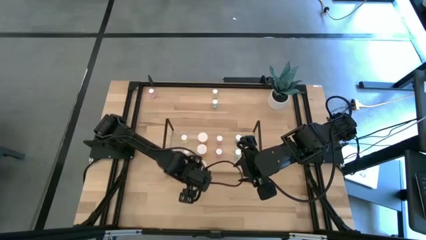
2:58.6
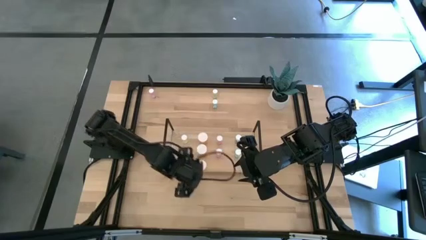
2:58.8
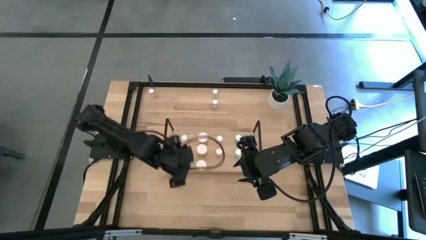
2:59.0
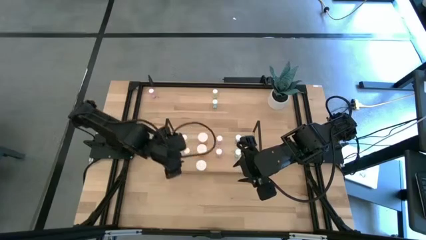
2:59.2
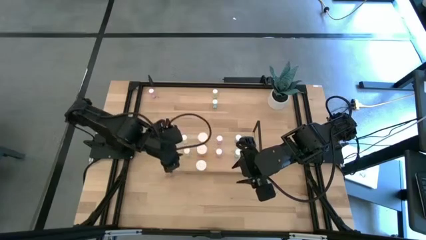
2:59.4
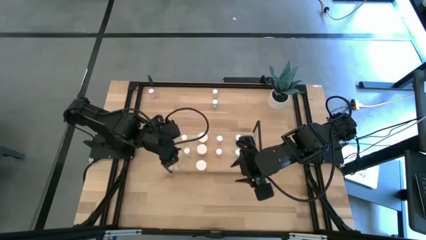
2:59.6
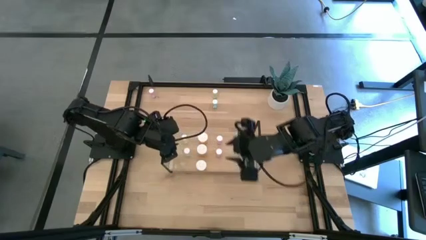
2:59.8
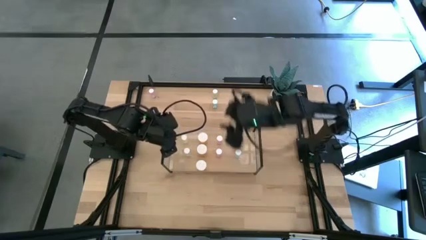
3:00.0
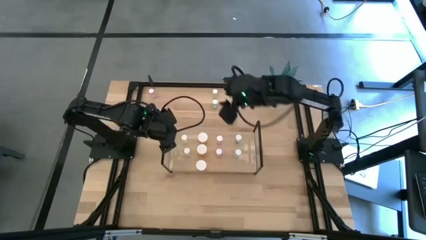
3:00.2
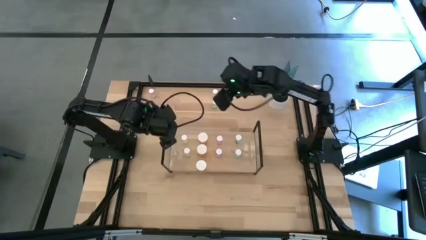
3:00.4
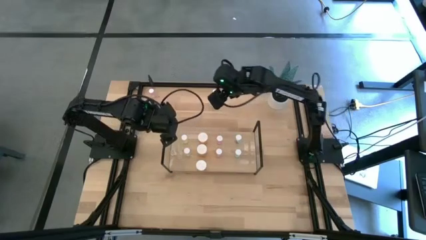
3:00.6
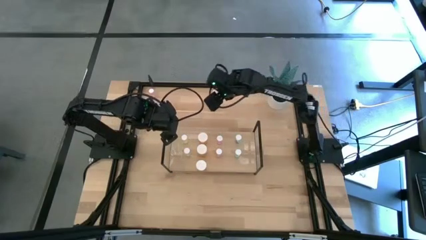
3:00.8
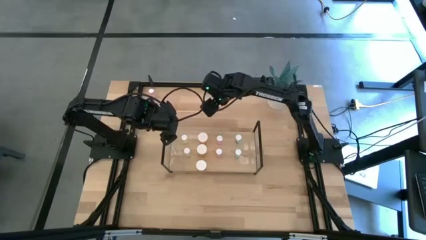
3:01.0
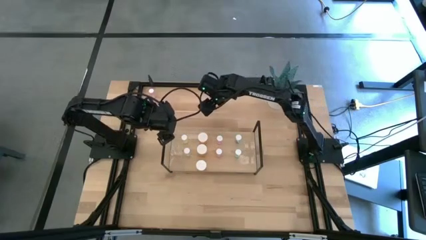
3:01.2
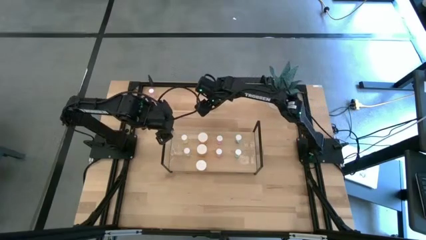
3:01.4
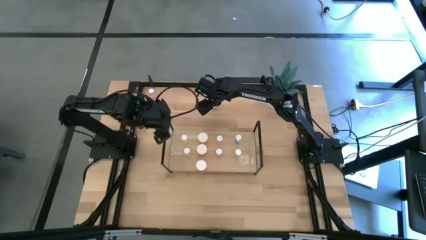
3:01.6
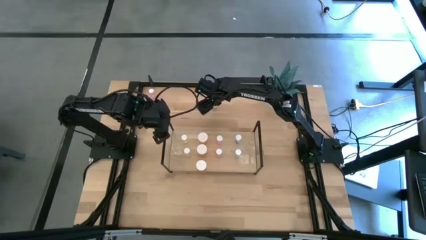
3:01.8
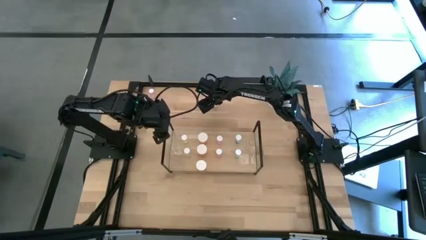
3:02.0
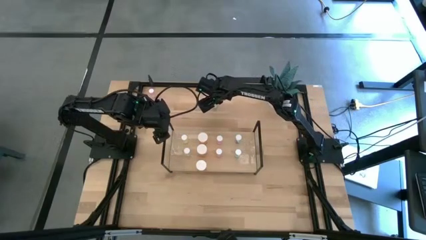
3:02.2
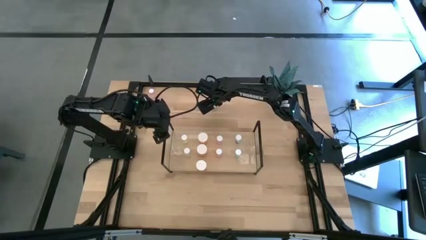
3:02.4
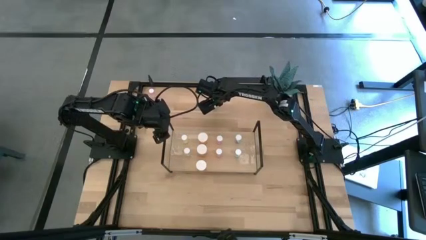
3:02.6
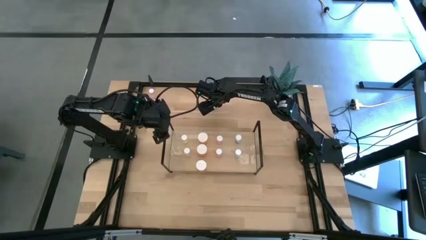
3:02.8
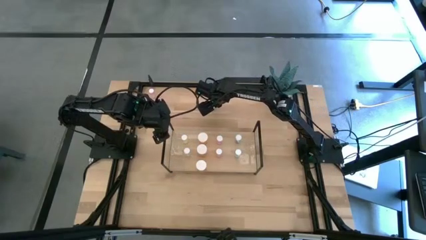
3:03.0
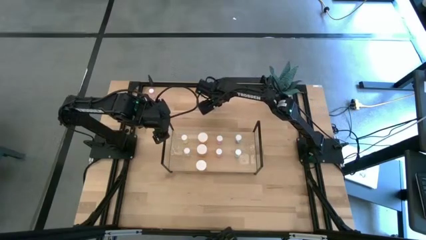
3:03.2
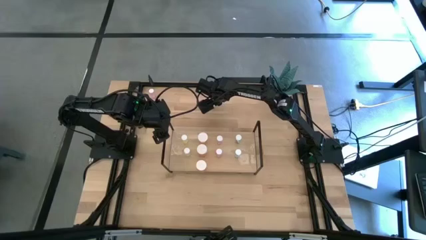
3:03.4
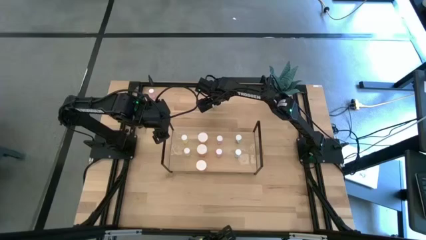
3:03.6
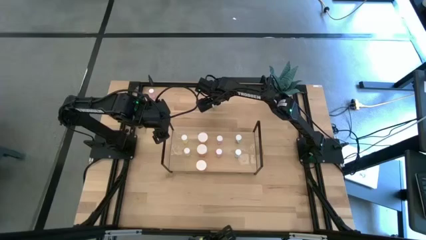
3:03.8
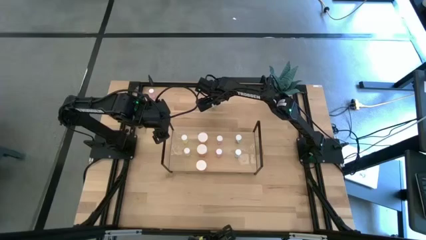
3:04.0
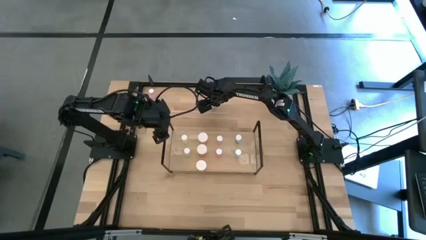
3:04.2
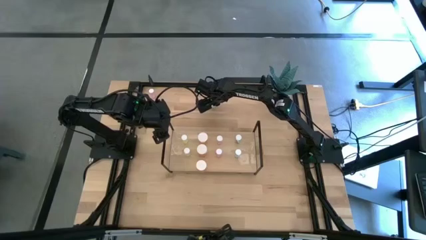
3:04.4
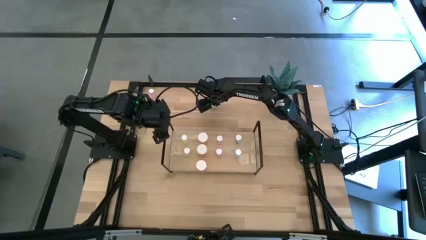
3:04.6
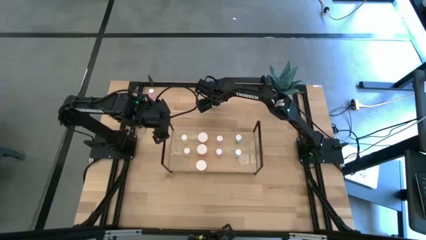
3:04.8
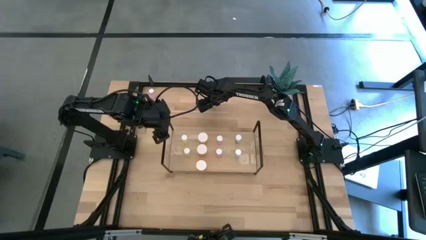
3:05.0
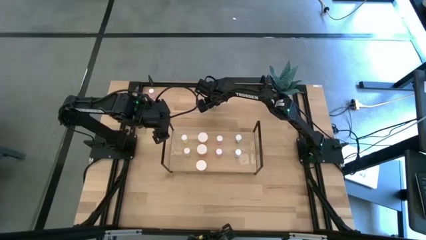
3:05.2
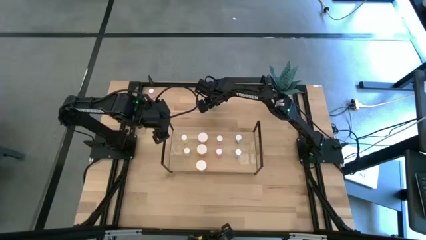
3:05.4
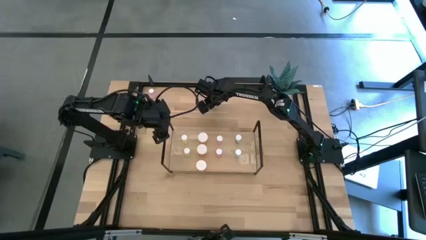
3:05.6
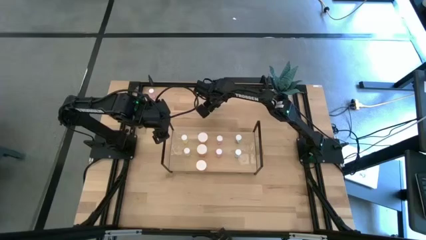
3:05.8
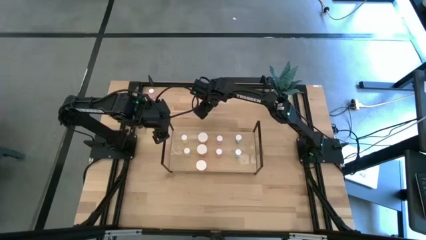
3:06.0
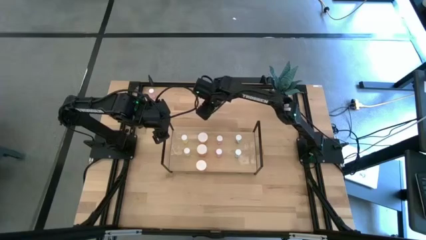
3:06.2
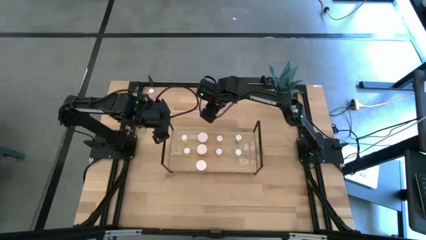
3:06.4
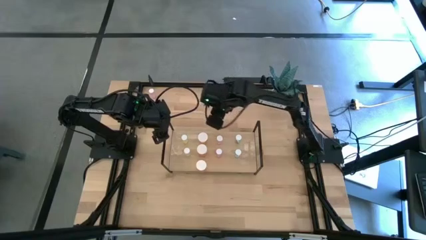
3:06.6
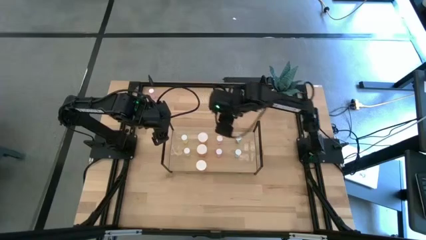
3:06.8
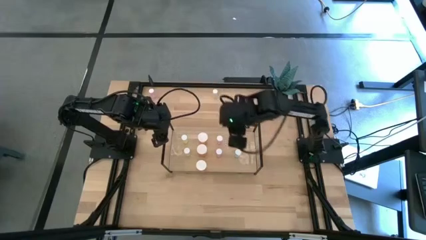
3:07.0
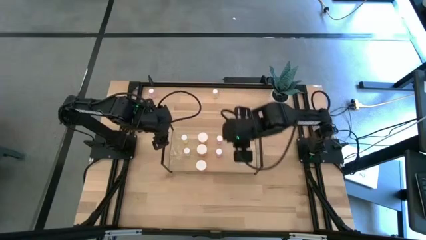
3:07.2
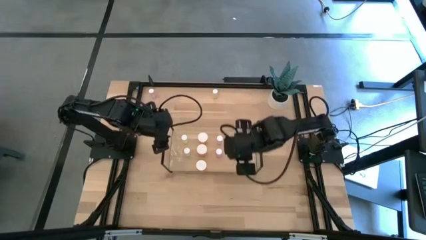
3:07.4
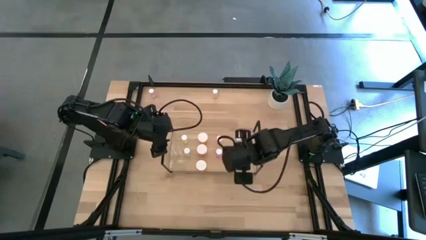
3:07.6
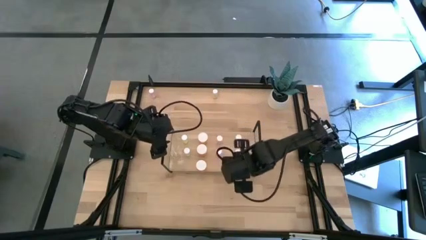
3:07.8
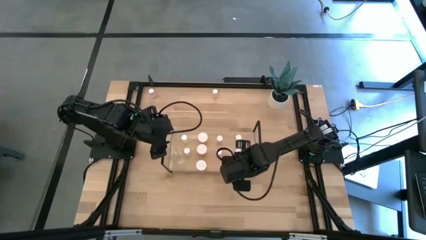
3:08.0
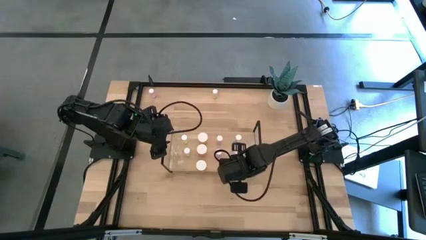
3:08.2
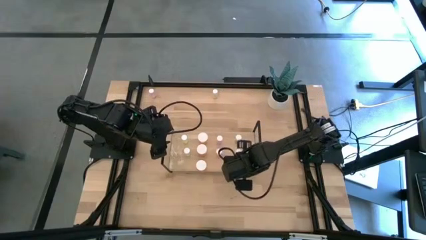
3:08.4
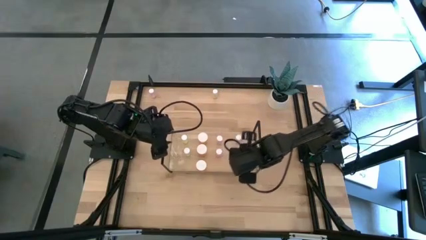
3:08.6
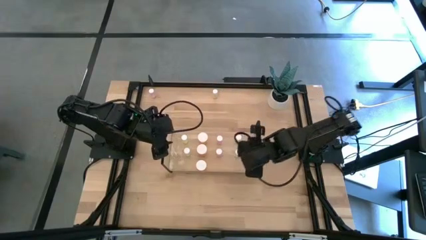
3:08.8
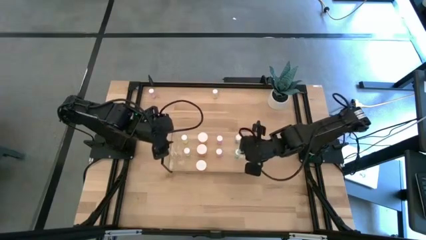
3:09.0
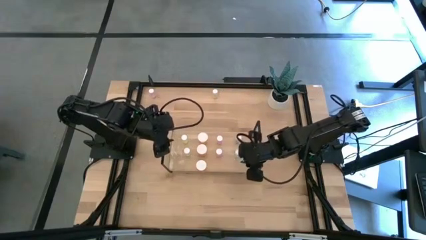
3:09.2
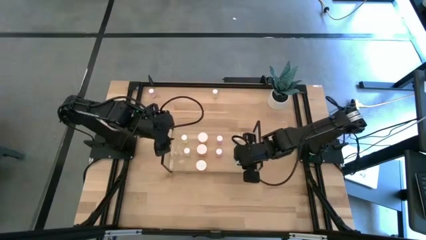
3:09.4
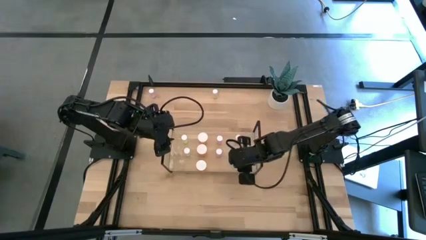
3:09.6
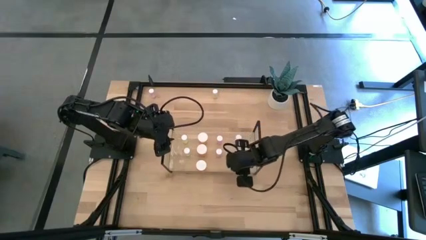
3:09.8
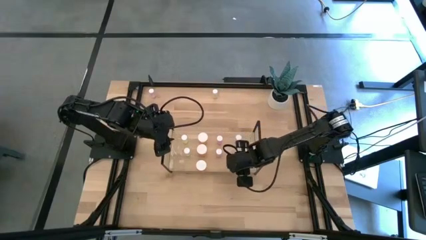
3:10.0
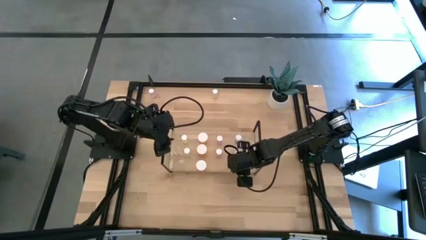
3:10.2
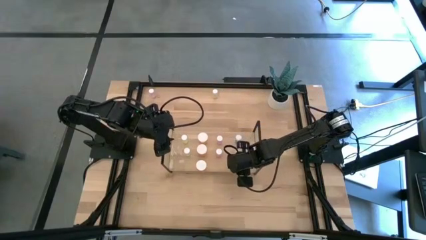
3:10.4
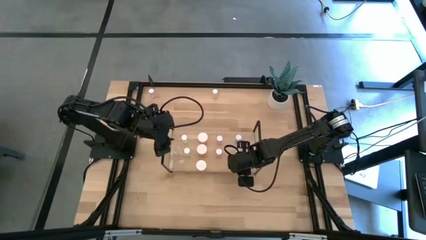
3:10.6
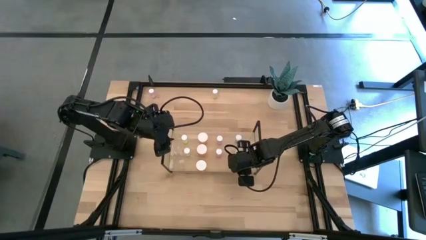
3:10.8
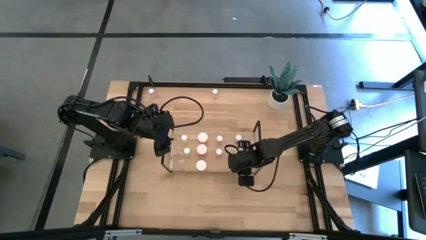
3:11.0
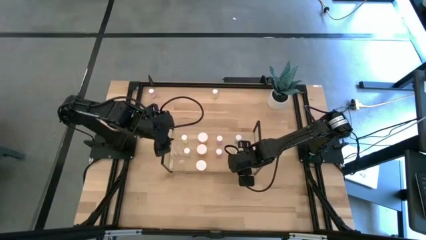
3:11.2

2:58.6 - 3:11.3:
Task: Pick and place medicine bottles onto shelf by color
Put the blue pill bottle aligned with the blue pill bottle on the shelf

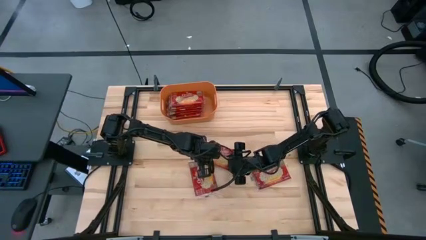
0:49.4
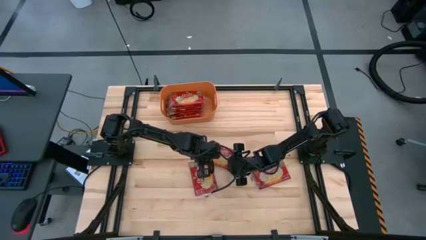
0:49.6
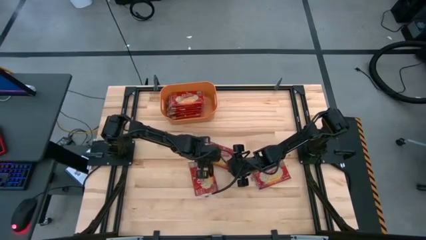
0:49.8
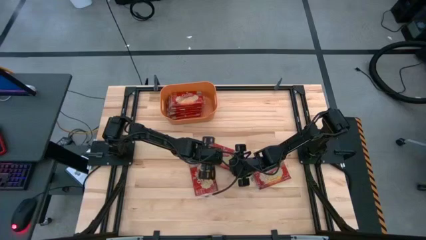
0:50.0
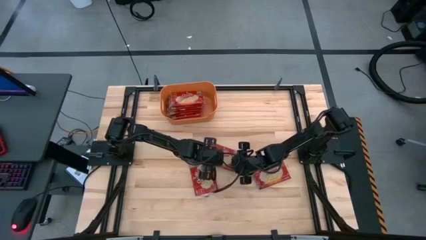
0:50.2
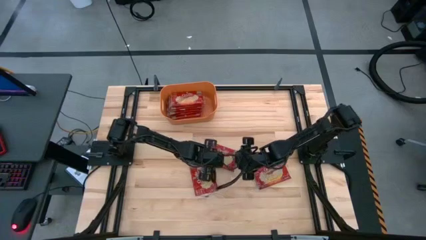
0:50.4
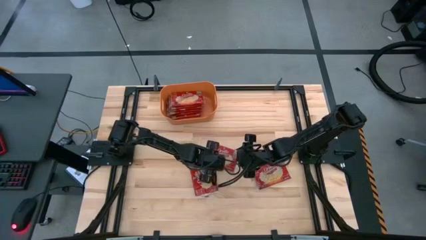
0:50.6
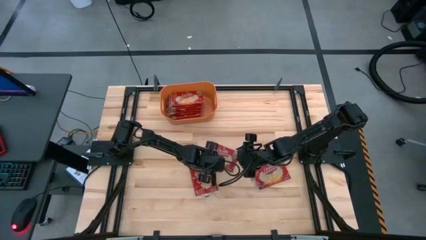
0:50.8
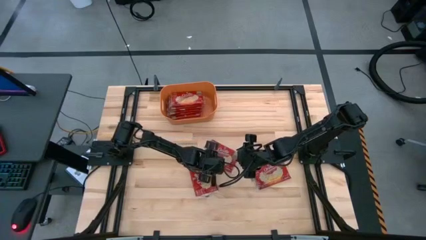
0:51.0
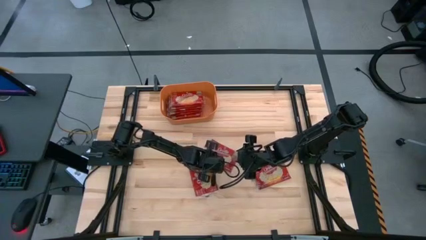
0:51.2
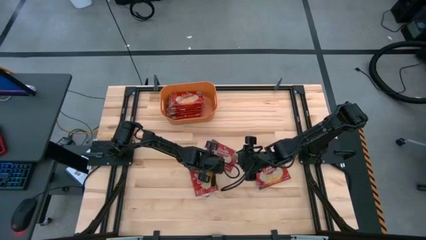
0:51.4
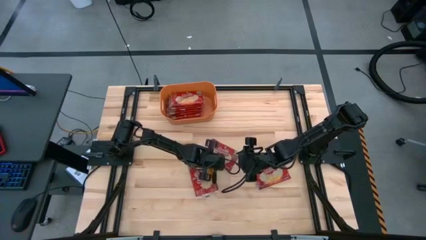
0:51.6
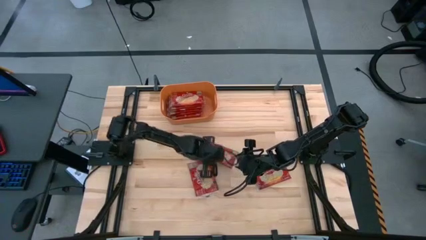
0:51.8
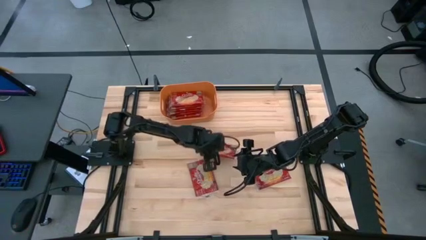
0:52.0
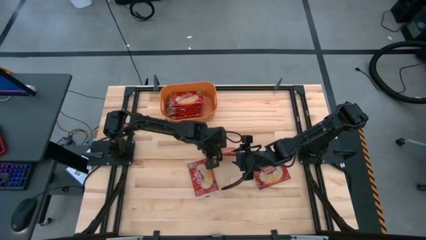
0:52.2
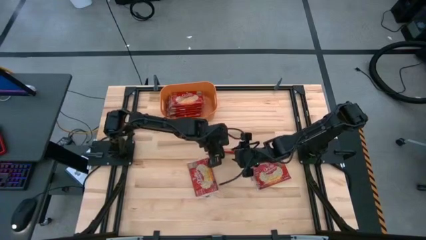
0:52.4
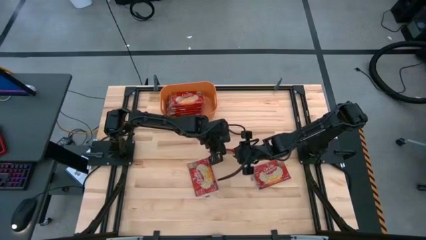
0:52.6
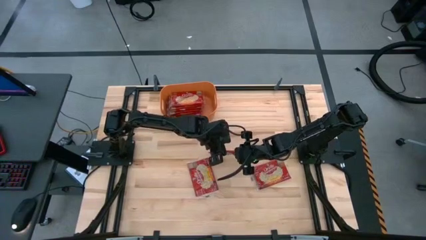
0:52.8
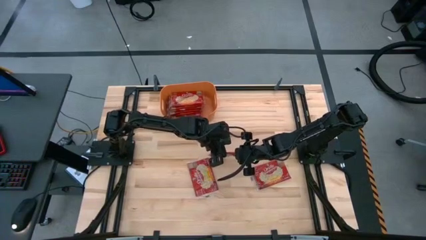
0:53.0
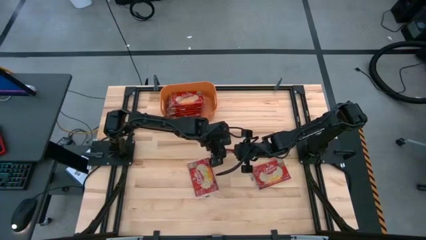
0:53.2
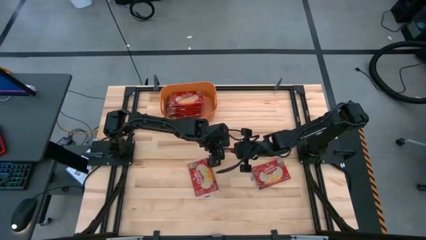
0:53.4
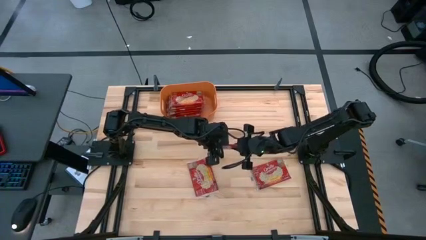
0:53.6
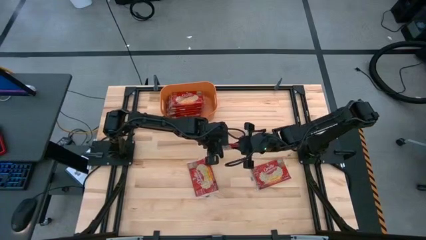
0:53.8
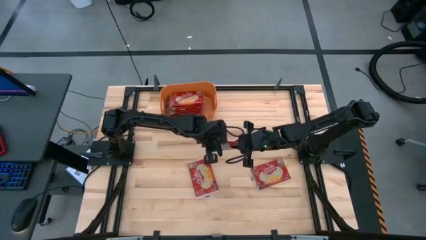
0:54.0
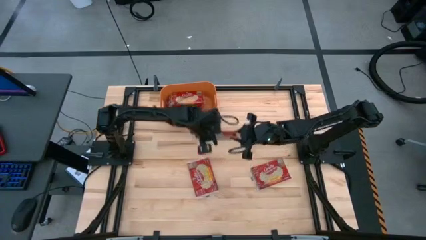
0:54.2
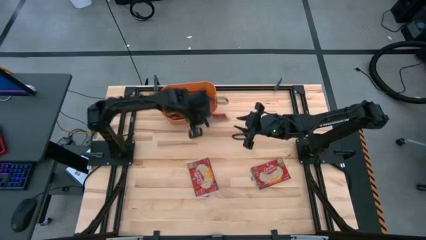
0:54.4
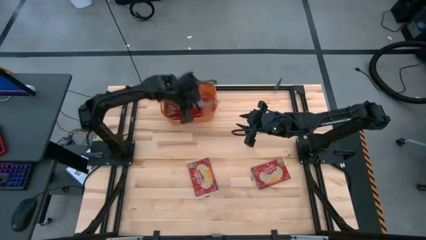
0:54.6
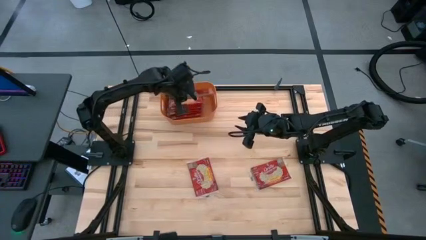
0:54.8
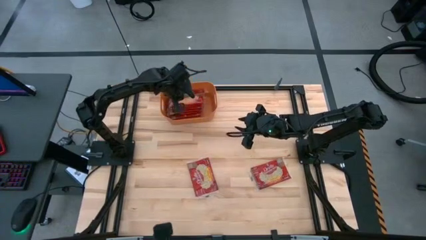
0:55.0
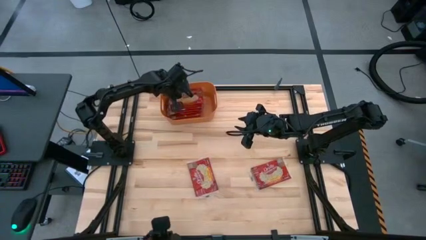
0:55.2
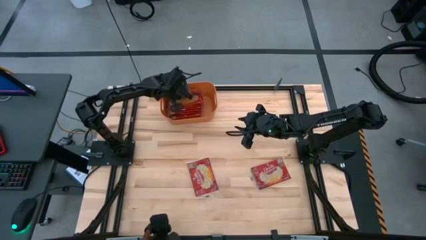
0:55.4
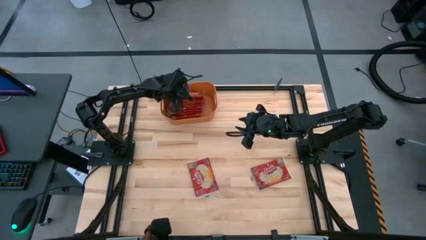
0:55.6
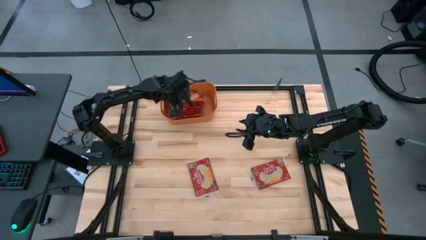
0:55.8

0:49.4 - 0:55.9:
Task: Sort popcorn bags into baskets
Put the red popcorn bag into the orange bin
